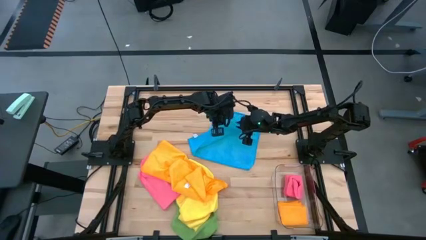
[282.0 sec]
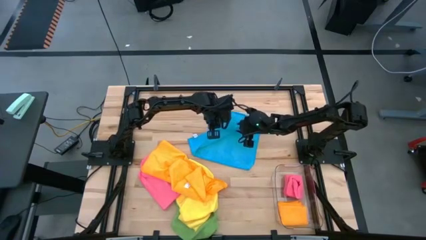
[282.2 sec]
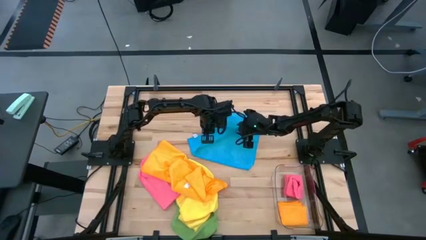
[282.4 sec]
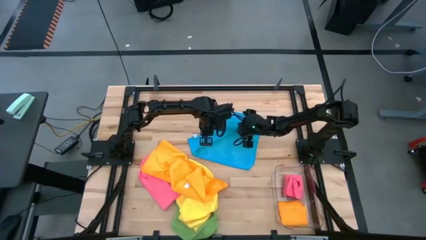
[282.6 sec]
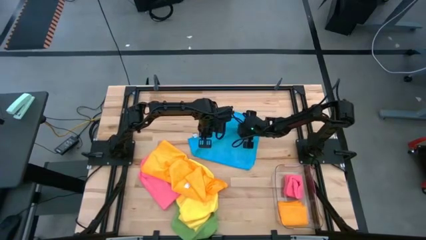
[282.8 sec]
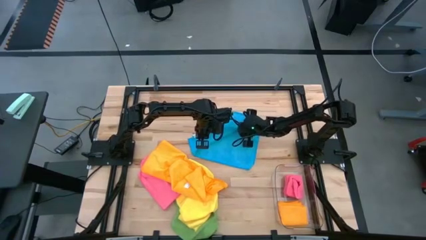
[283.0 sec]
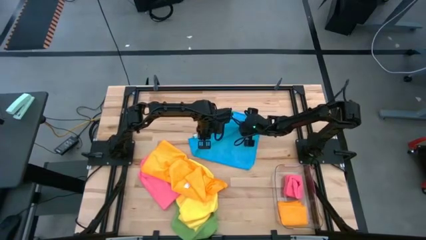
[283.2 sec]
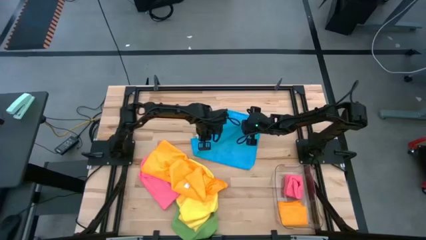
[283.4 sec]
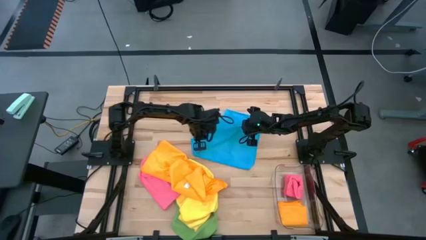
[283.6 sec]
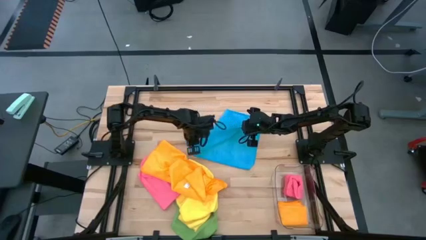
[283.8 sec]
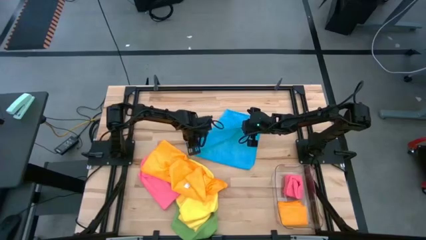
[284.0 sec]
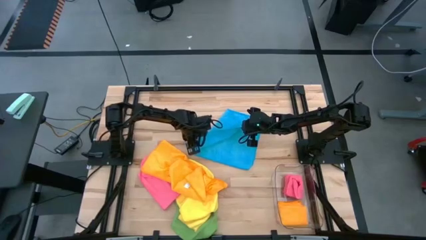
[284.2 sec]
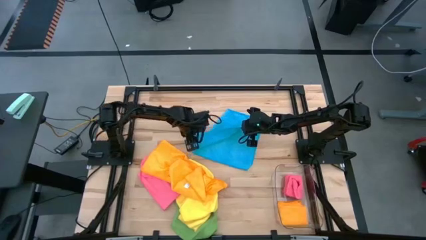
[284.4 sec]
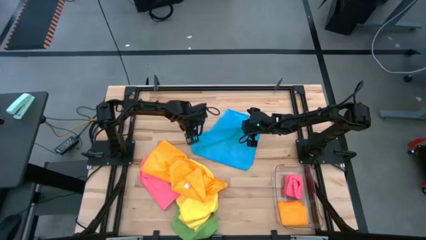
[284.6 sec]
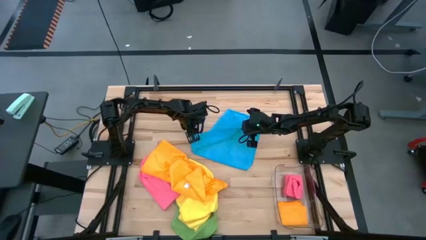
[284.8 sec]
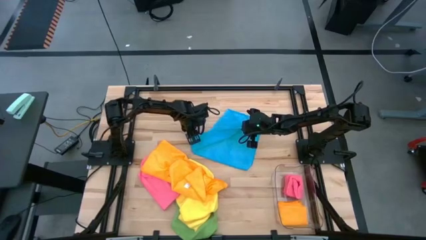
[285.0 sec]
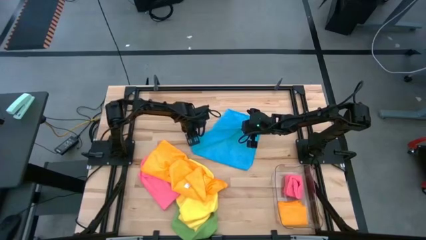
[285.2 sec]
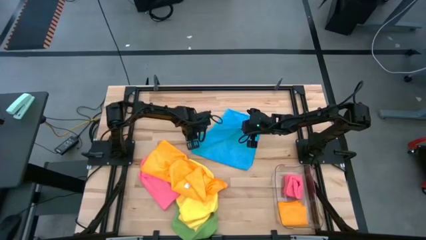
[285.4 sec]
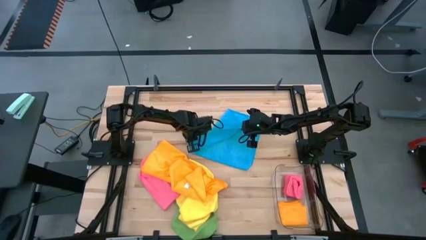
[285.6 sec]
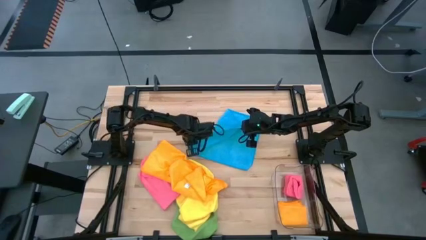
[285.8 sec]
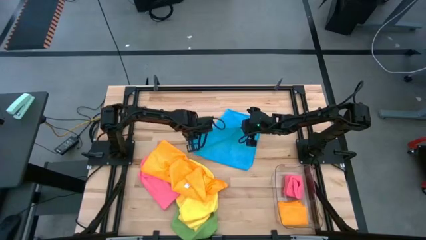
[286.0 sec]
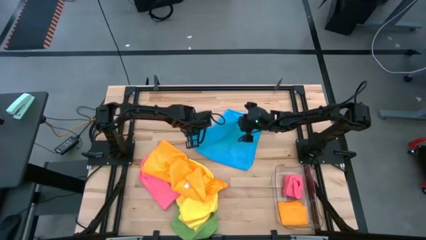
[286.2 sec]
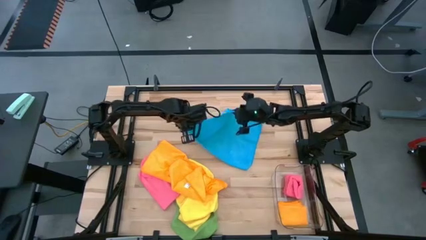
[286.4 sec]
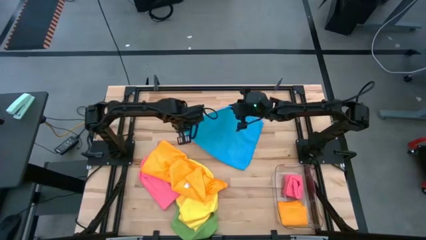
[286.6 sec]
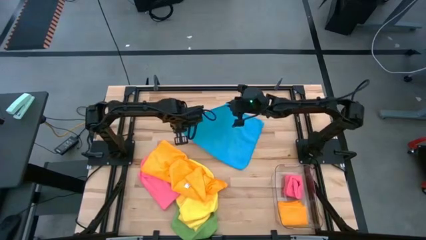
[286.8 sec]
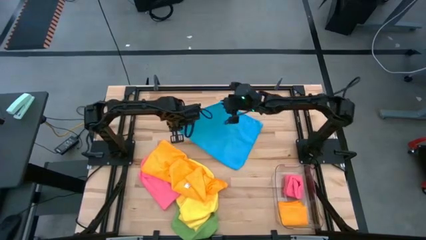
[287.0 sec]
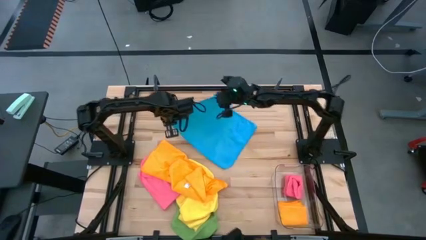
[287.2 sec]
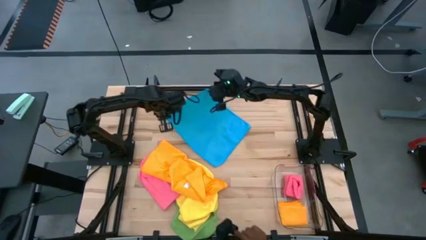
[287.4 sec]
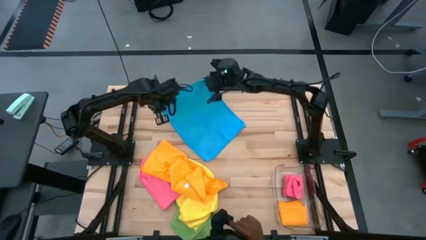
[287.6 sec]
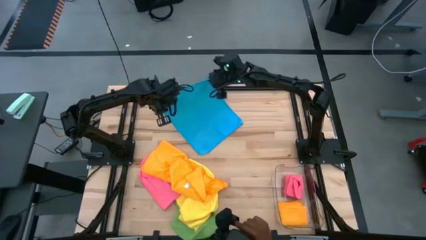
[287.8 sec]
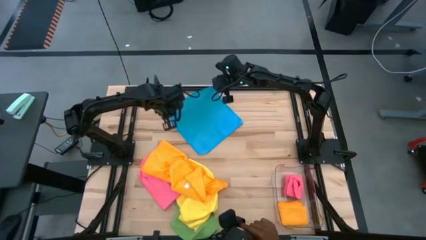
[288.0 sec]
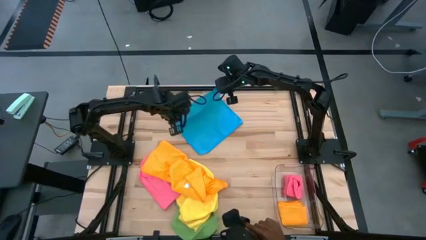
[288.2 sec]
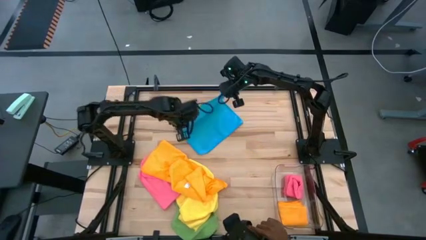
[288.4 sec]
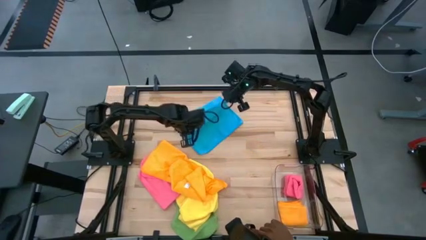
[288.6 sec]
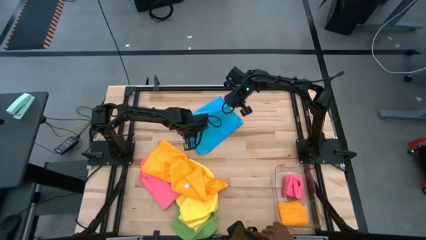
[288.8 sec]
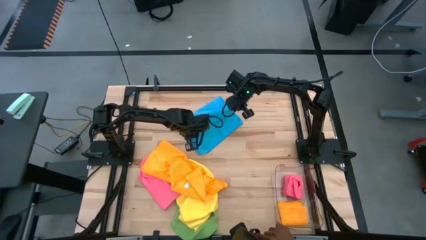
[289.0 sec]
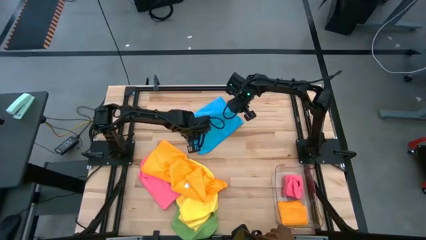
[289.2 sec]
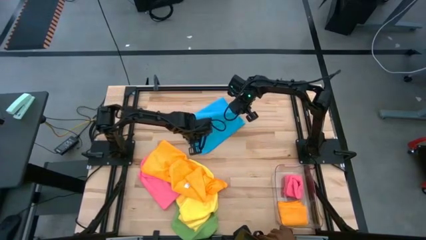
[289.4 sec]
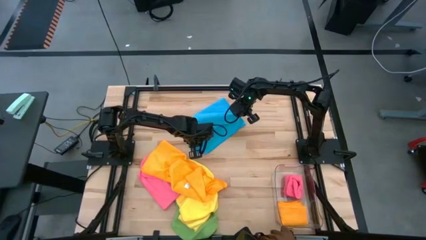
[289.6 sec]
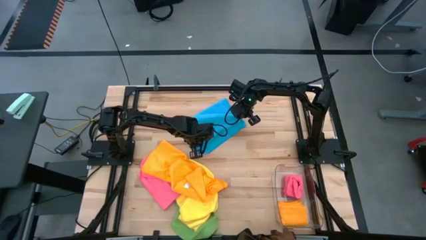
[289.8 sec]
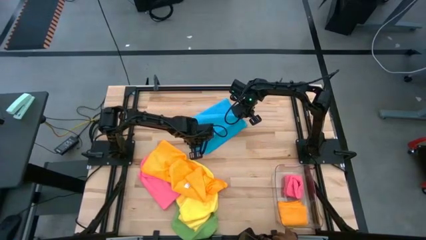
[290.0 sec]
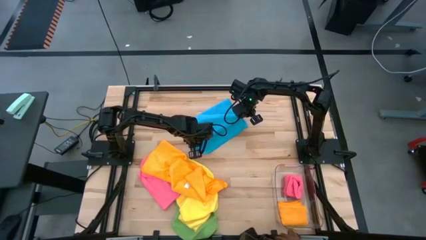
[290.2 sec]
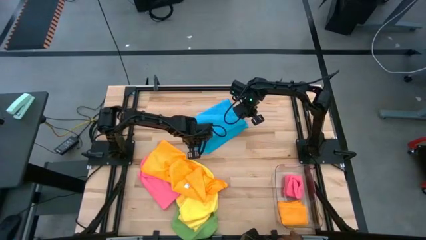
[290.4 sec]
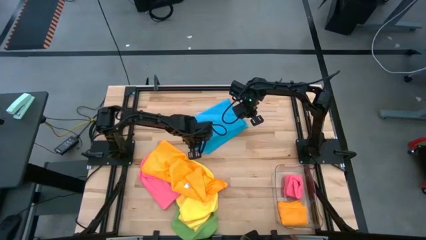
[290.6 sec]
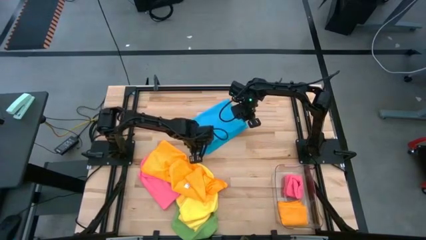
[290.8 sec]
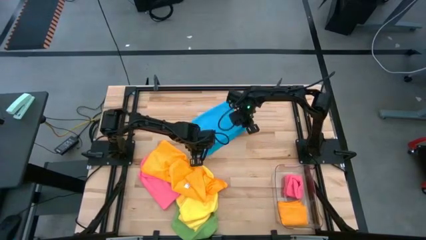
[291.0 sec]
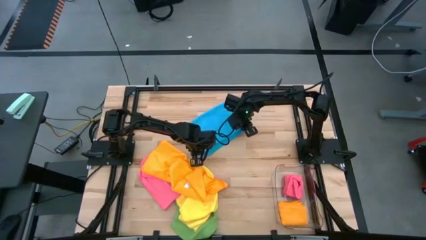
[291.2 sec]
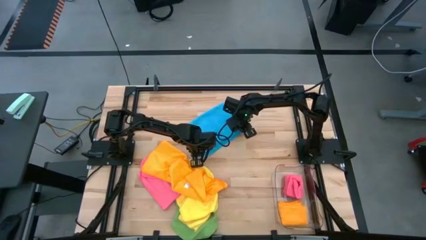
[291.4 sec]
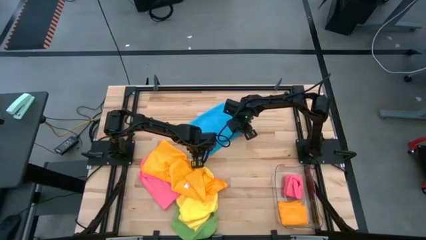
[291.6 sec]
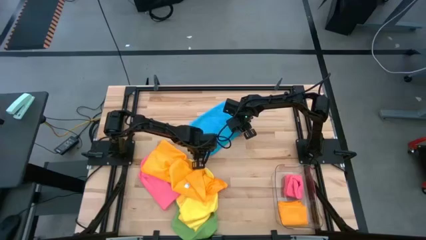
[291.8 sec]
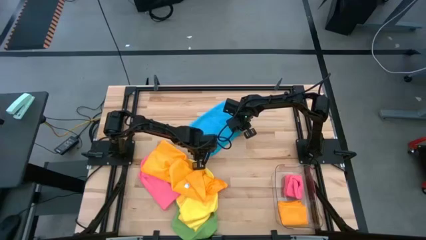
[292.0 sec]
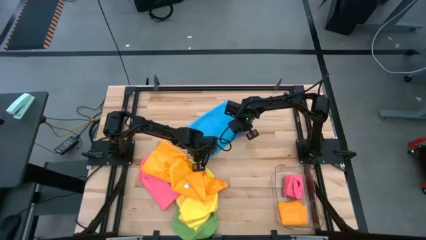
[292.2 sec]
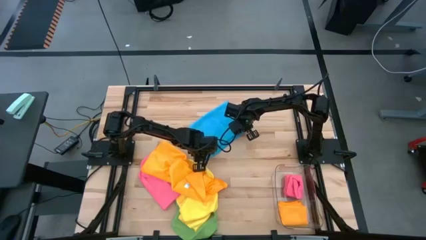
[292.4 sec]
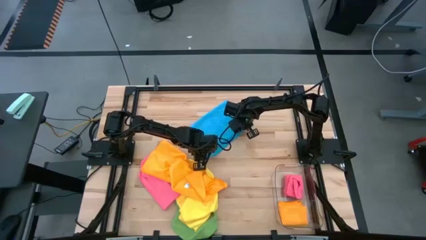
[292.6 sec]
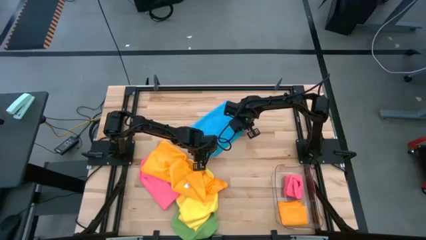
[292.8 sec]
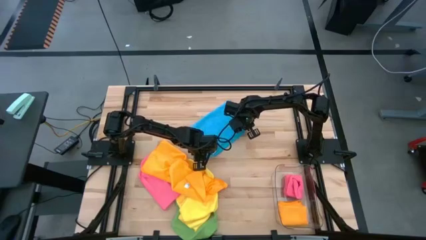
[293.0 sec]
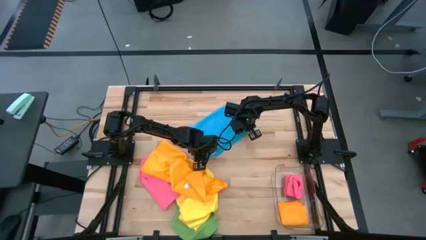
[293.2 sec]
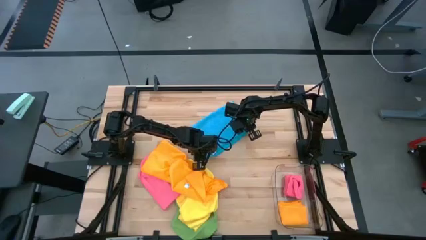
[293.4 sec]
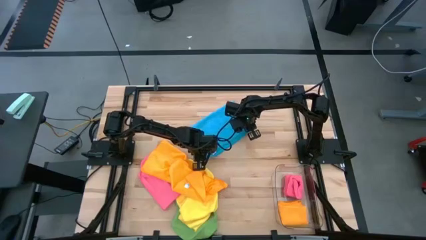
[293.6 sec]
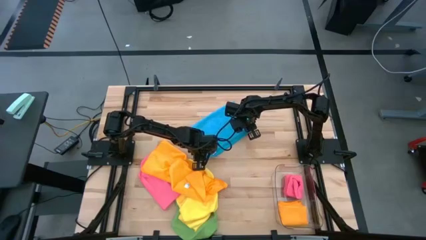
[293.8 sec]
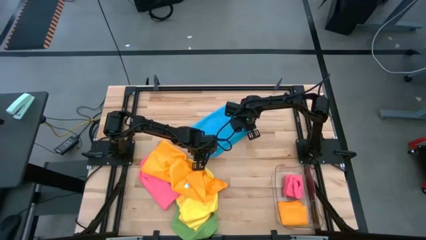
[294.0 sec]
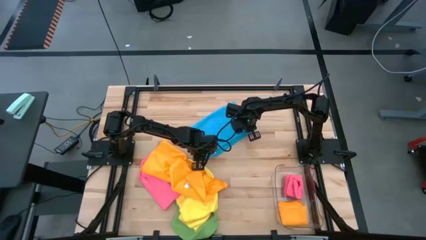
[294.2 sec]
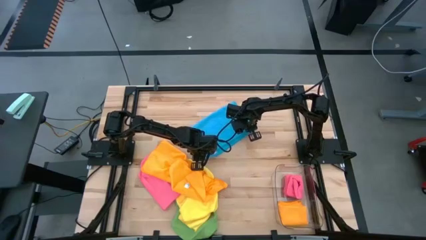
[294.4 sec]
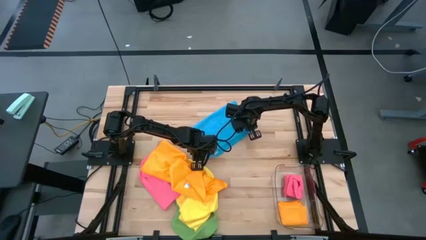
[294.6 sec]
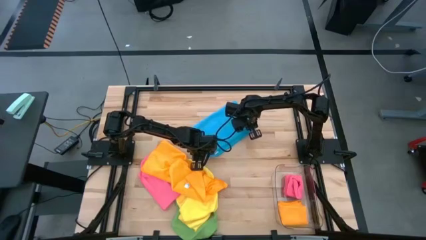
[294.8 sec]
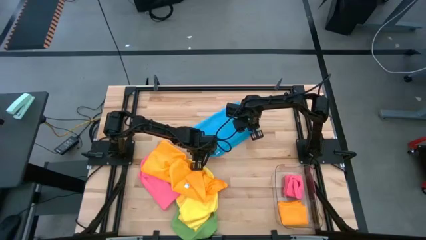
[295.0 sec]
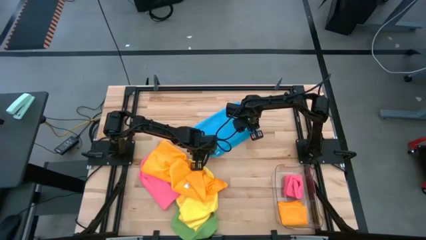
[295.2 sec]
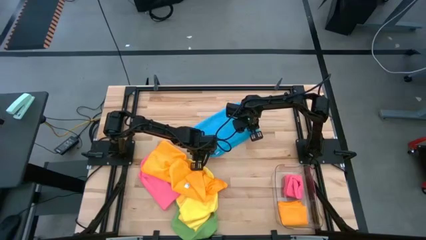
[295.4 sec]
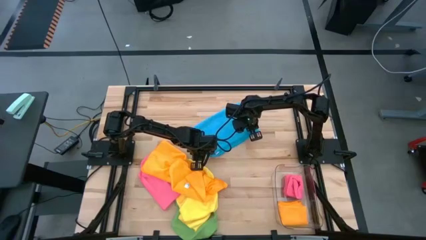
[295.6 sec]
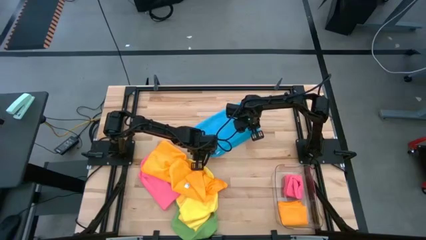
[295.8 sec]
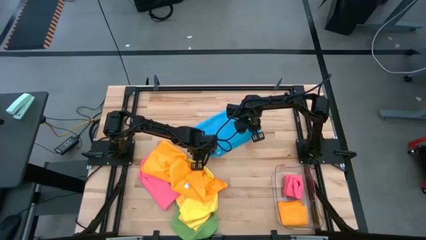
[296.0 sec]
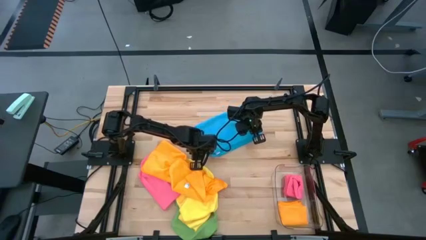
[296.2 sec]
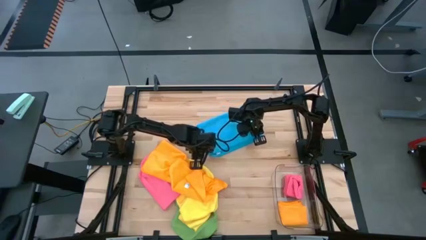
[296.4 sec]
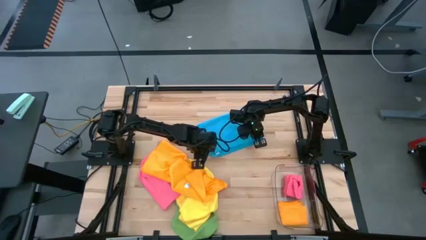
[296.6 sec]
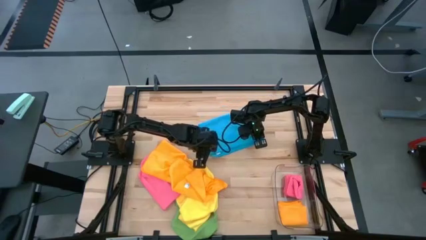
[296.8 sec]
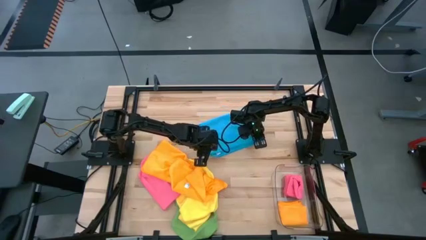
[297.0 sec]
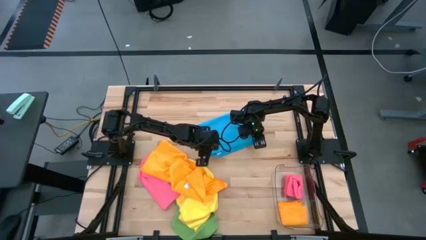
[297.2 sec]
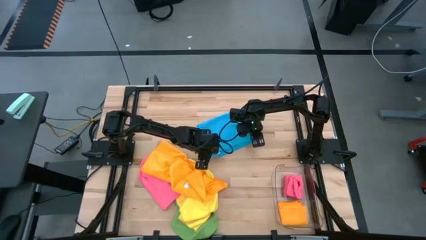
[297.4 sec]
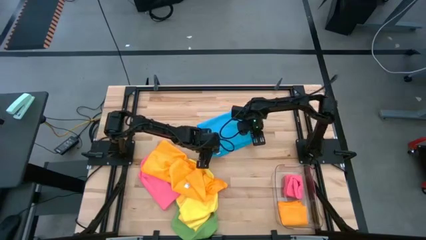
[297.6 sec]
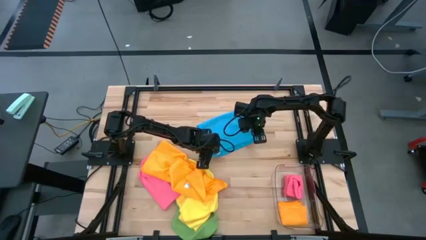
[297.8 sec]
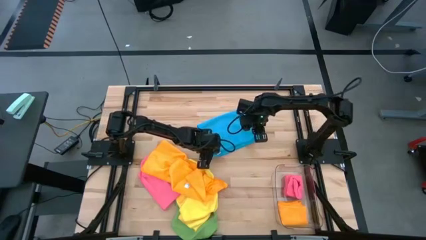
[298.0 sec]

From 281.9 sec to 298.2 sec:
Task: Fold microfiber towels
Fold the blue towel
